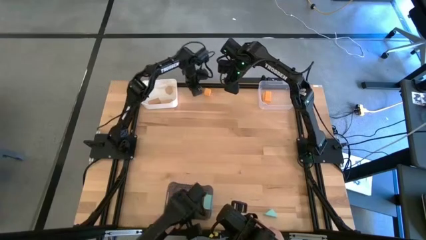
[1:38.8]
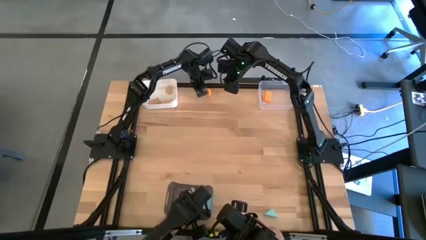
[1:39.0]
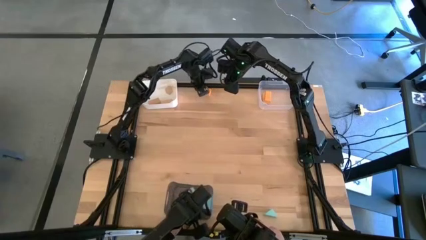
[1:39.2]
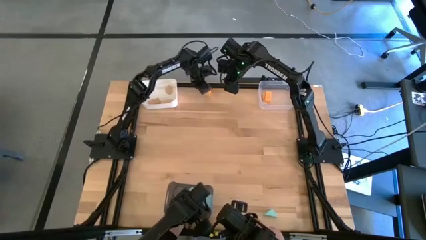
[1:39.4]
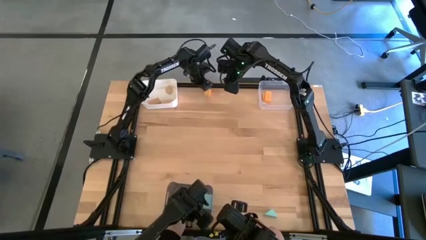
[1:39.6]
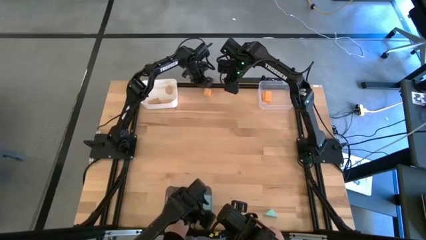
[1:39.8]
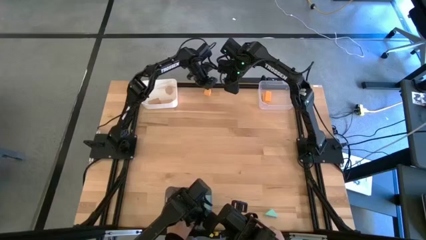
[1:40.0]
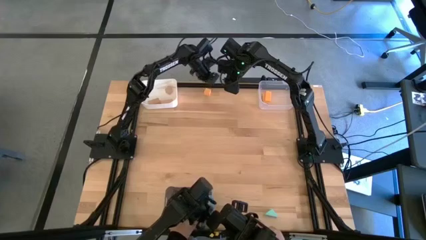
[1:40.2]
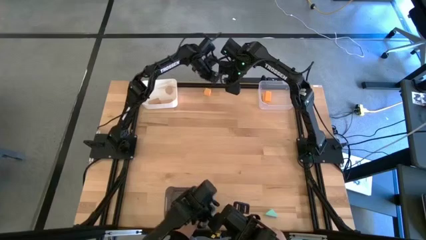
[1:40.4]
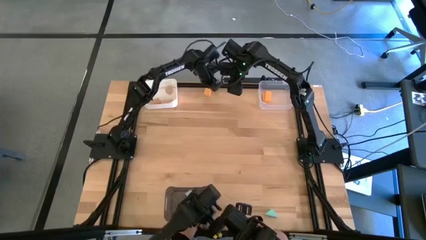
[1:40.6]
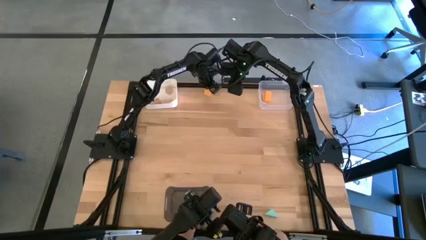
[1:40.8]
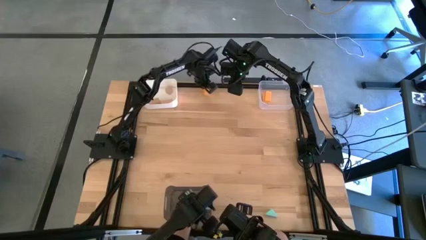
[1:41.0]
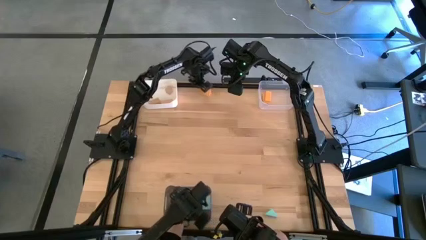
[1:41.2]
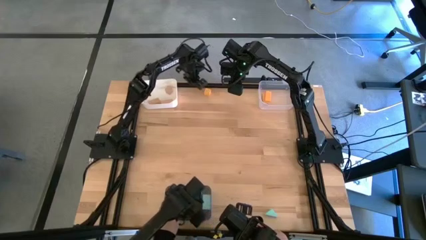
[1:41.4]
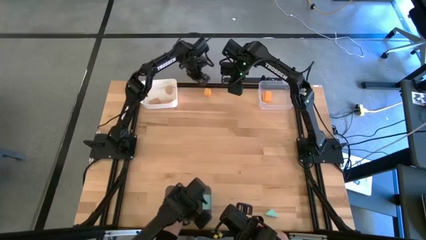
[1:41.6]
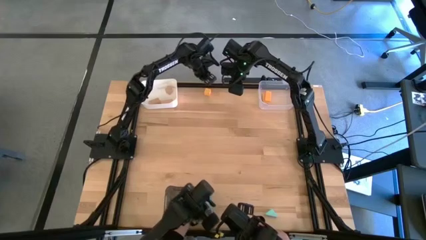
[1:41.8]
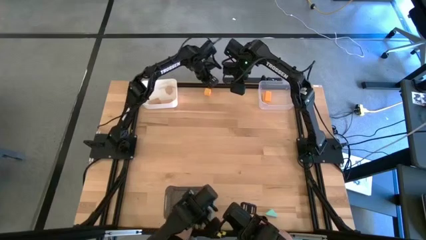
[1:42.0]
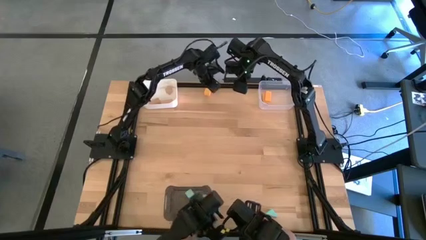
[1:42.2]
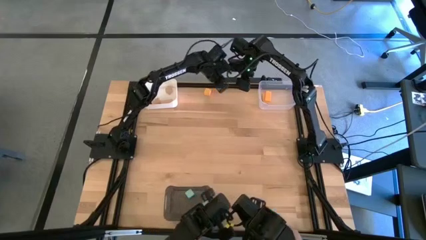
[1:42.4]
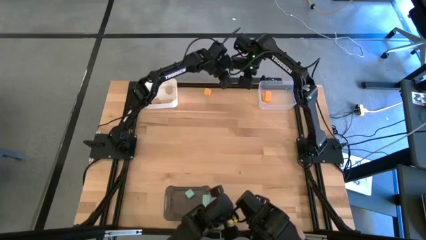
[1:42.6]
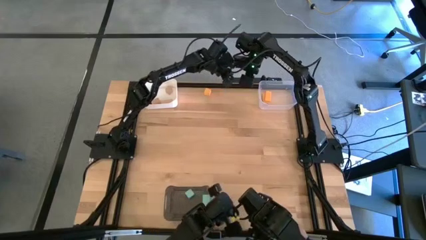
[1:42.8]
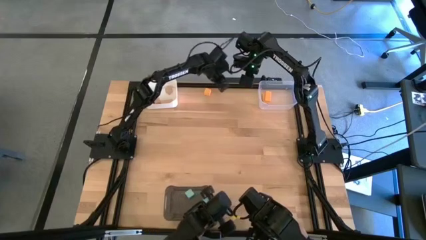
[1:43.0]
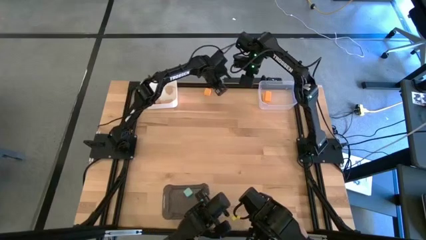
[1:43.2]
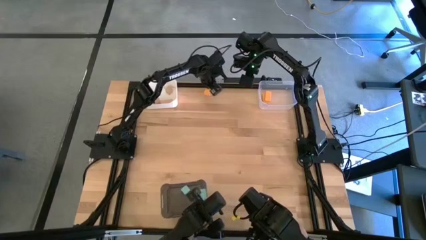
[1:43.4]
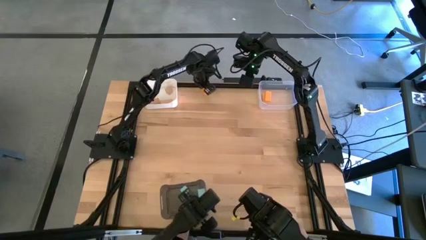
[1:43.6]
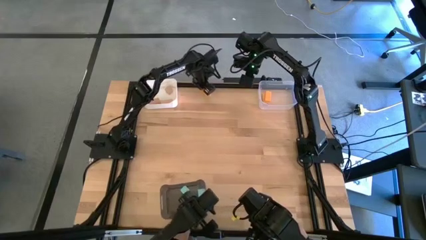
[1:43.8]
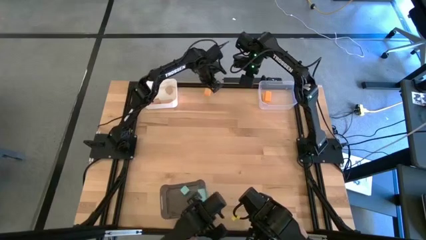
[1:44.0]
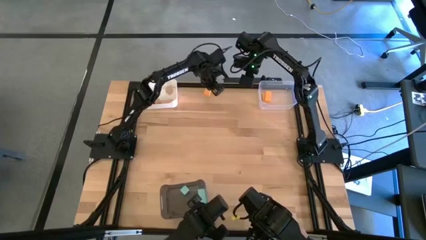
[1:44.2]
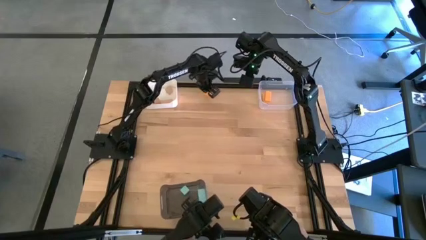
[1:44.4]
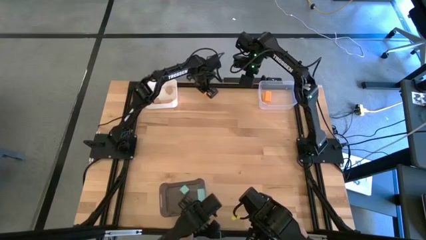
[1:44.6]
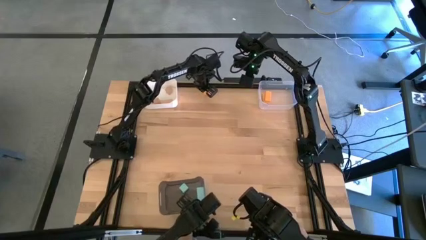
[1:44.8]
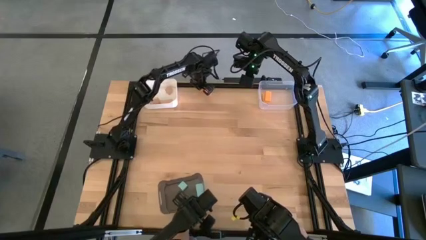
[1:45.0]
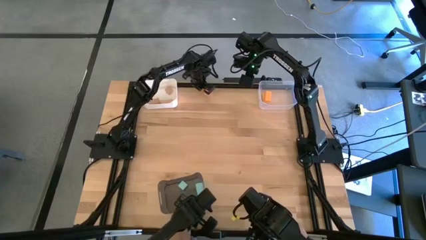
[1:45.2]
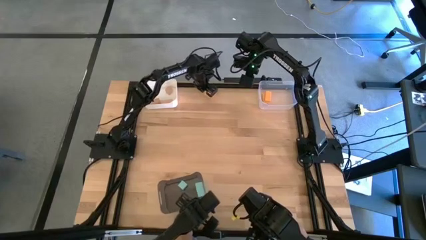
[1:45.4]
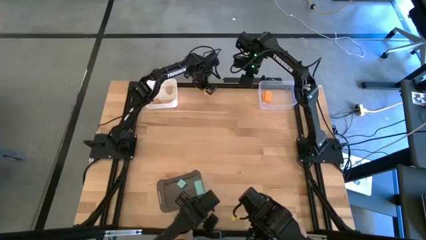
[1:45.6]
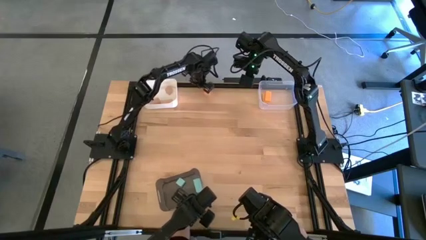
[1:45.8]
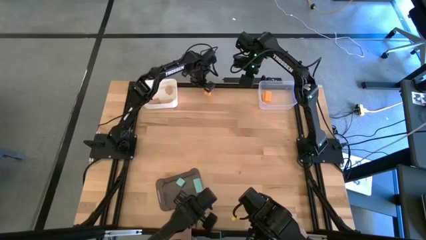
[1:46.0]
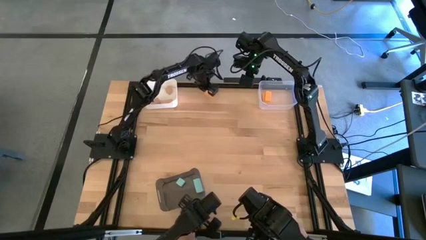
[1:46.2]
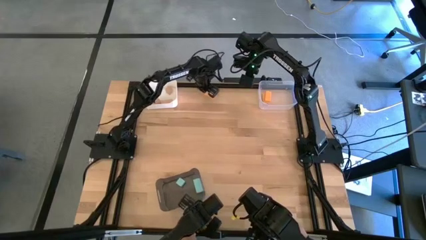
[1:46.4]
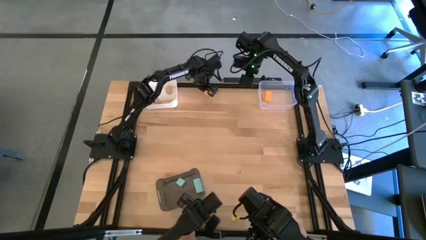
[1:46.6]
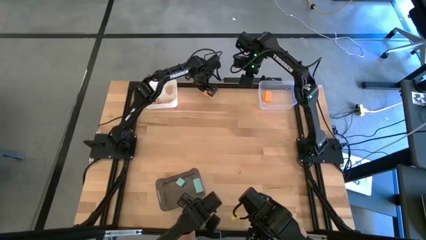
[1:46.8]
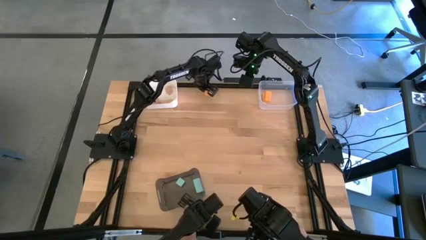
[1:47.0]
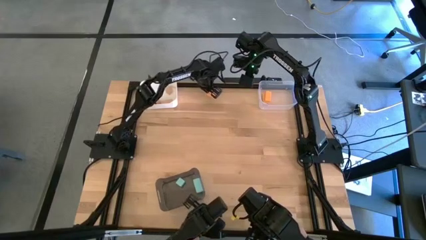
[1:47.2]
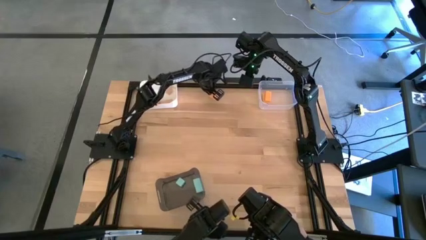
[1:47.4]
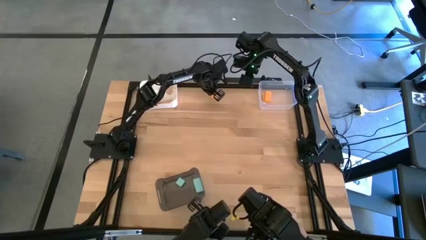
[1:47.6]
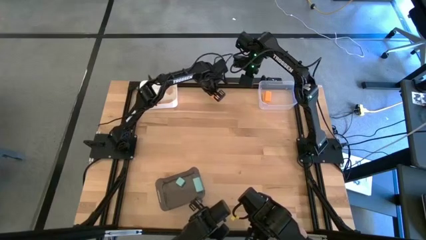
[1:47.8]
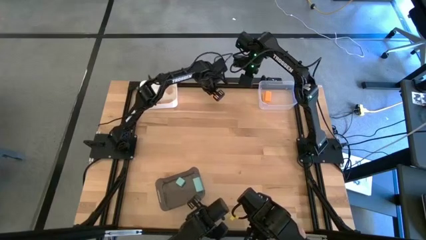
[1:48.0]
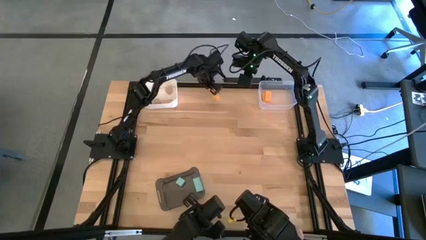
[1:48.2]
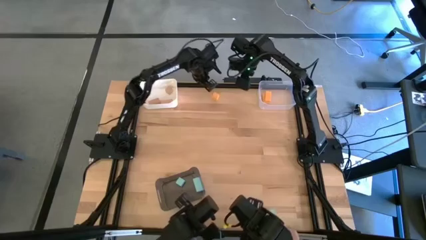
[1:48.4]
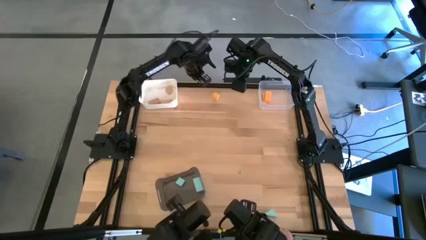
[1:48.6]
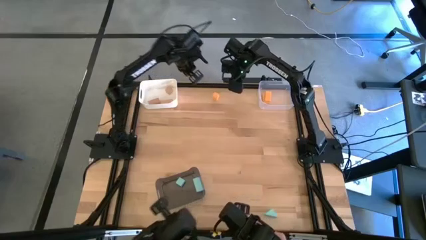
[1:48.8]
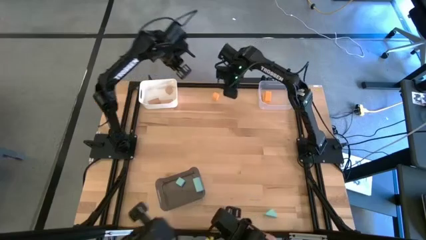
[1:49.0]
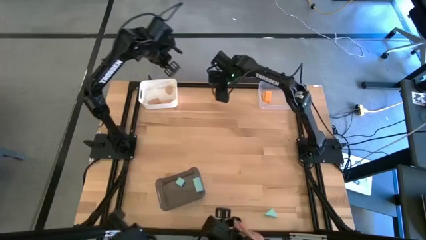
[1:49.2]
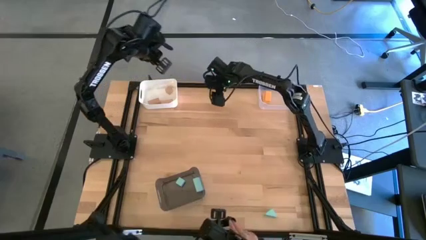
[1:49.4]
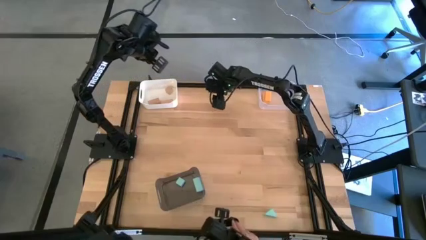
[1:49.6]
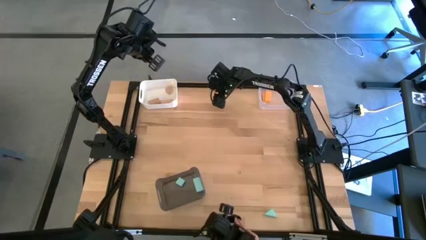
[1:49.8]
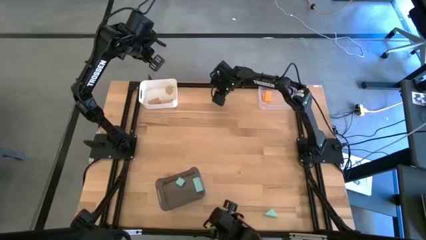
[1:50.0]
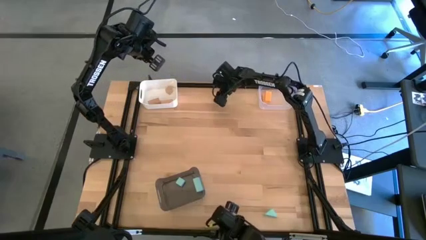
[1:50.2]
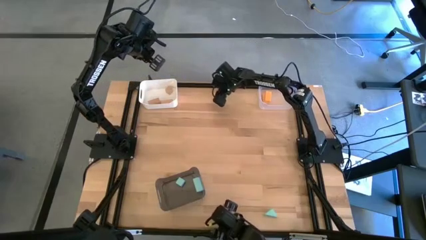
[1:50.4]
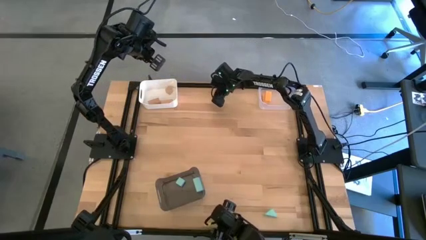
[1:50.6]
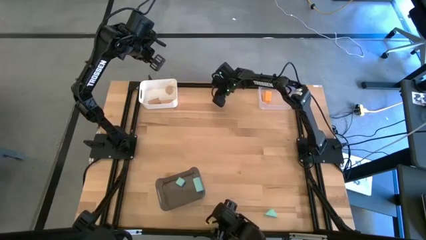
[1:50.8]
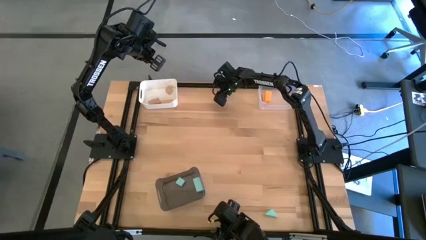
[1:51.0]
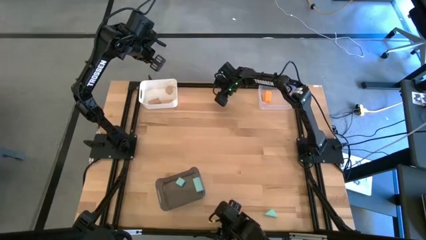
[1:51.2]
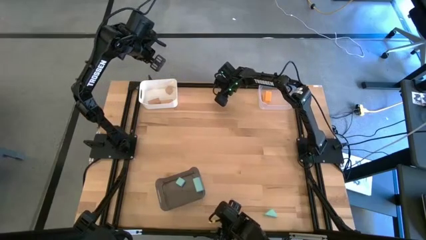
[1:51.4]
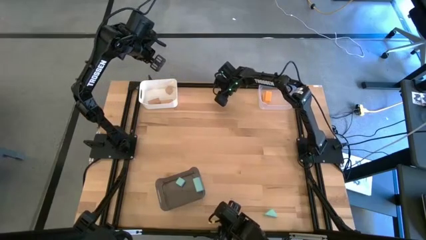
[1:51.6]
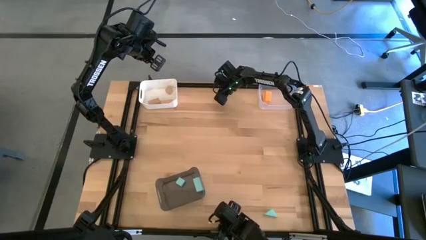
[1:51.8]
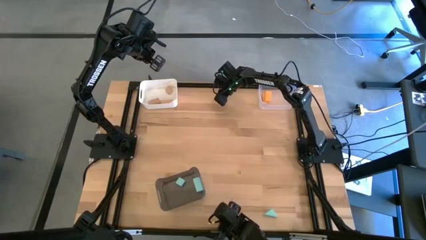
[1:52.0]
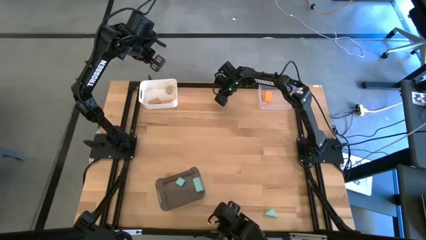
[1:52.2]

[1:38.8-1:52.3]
Task: Sort & place blocks by color
Put the yellow block into the transparent bin

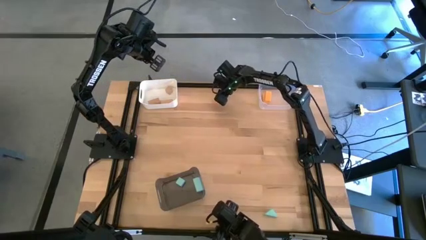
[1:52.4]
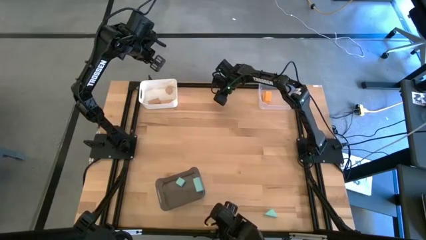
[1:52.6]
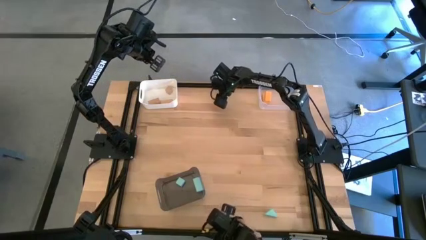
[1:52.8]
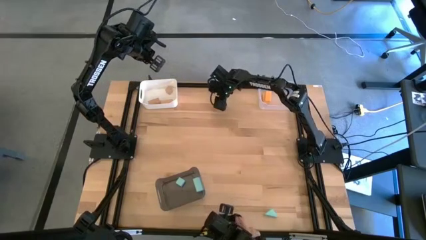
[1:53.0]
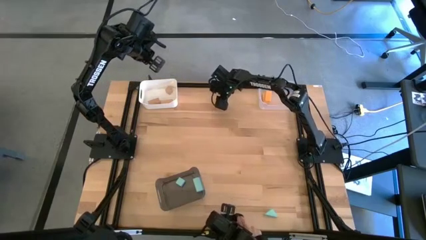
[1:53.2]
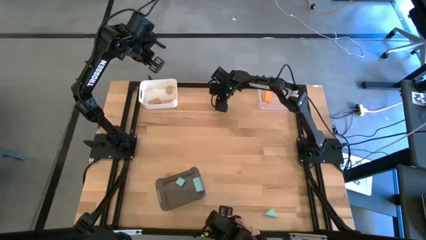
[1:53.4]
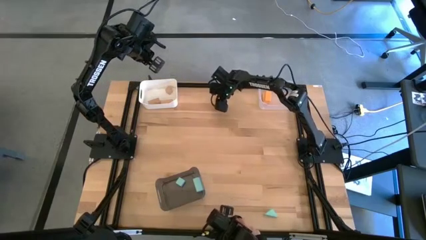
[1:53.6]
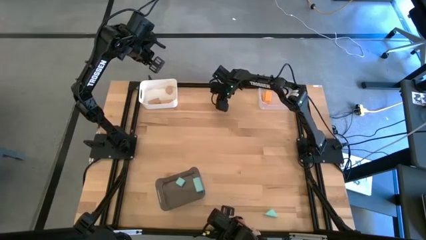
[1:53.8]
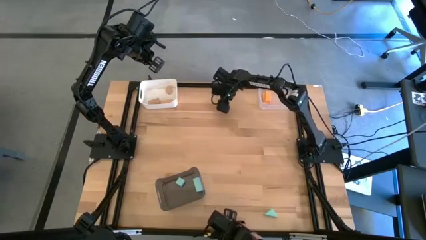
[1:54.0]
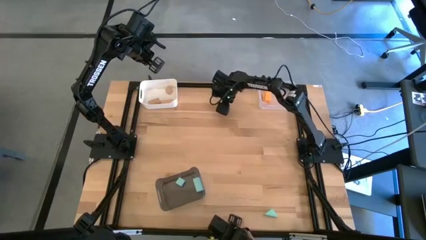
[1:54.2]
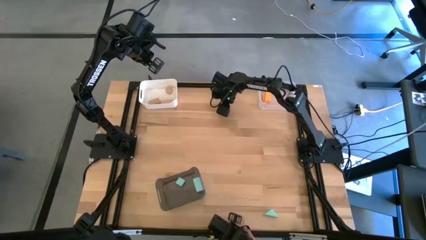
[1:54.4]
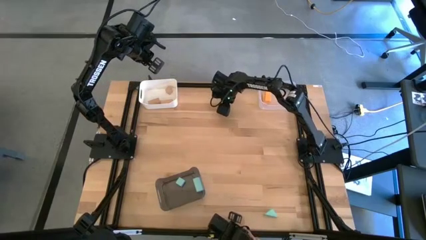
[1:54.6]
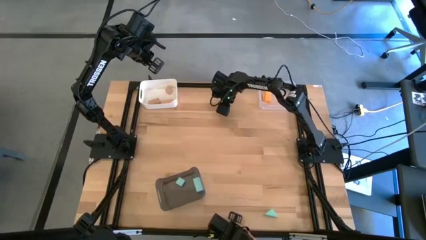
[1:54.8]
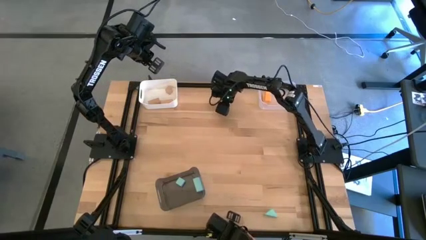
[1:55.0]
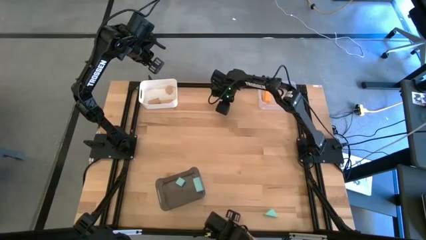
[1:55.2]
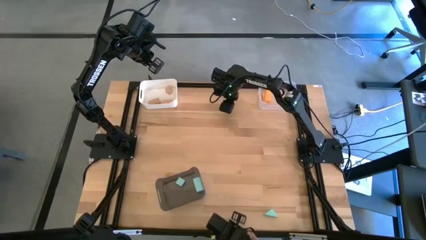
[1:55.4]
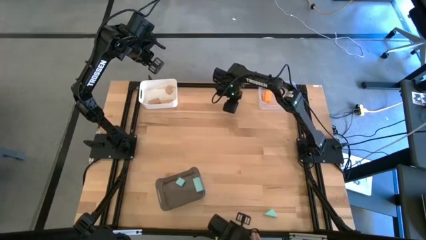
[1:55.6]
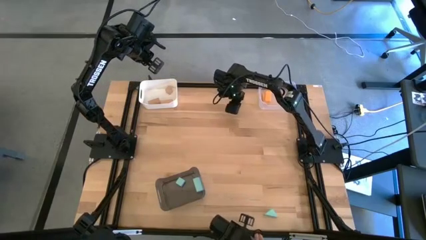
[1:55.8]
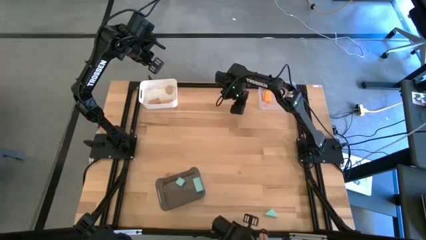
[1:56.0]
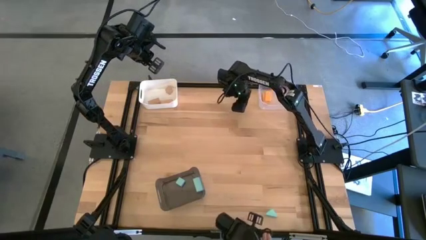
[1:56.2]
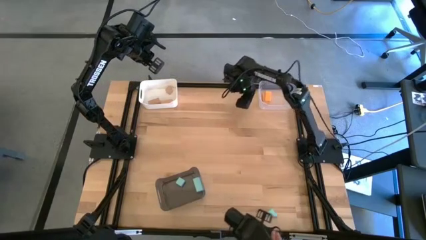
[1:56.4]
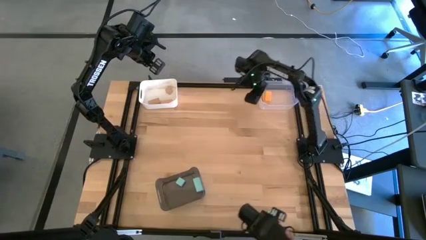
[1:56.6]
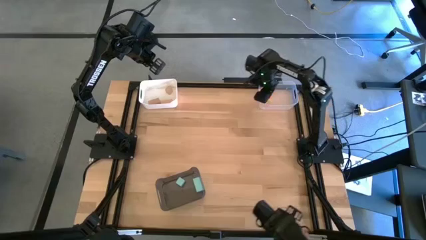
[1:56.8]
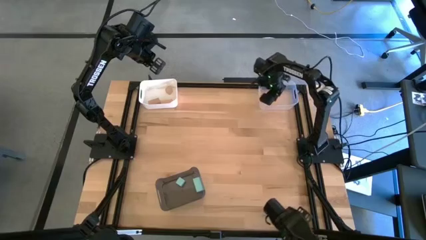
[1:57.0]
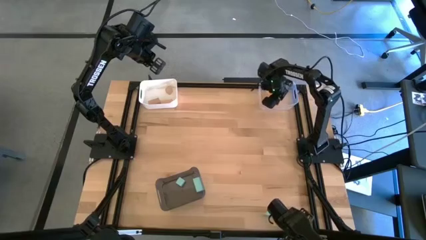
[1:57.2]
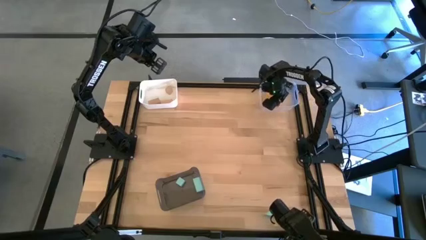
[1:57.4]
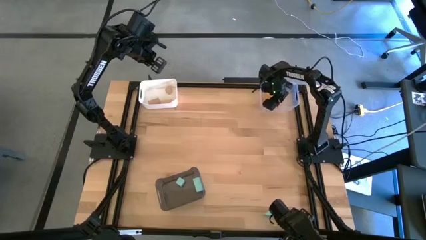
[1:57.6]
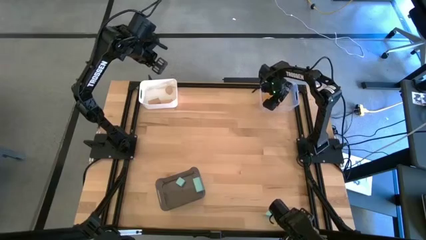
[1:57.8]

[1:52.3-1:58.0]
Put the yellow block into the transparent bin
